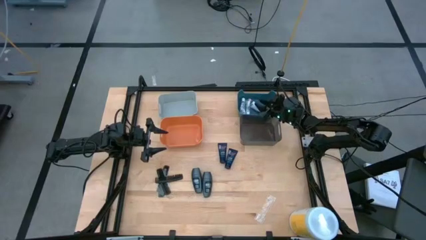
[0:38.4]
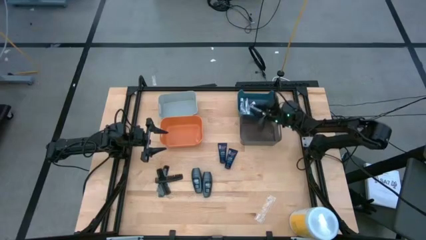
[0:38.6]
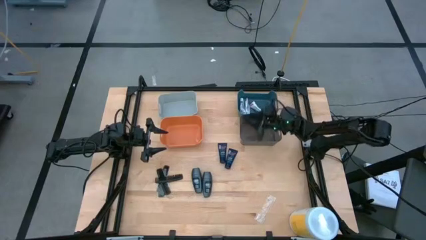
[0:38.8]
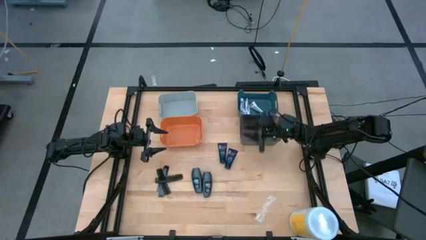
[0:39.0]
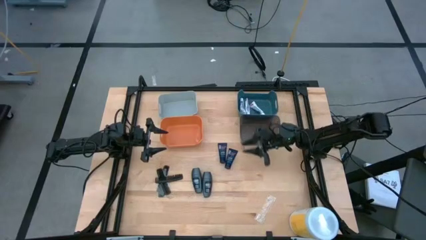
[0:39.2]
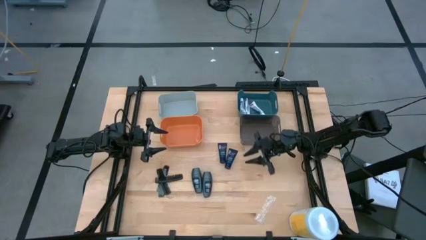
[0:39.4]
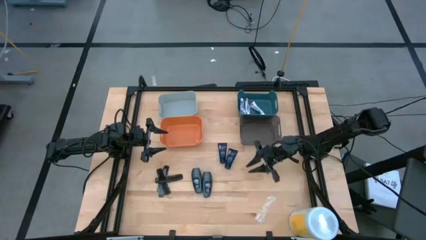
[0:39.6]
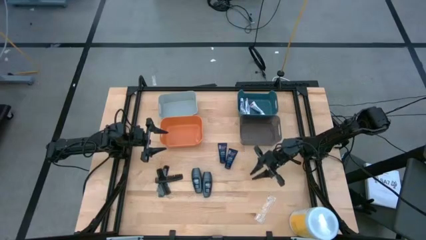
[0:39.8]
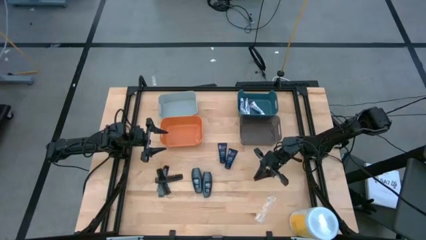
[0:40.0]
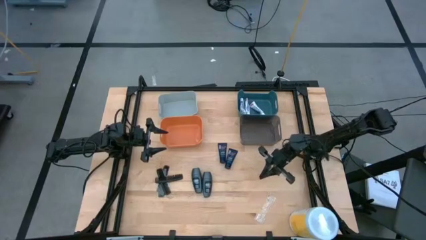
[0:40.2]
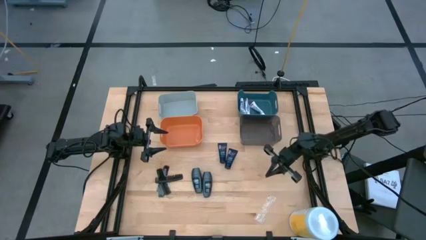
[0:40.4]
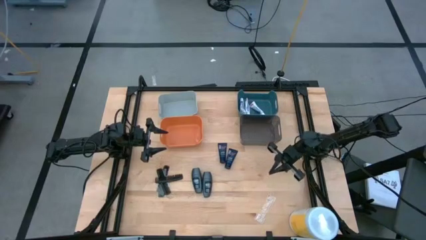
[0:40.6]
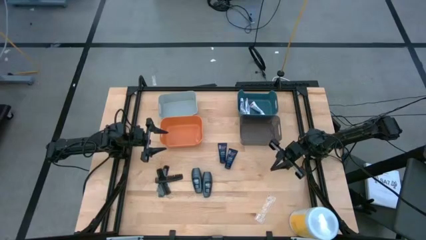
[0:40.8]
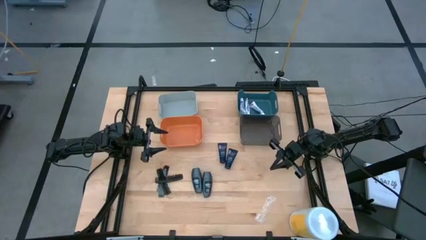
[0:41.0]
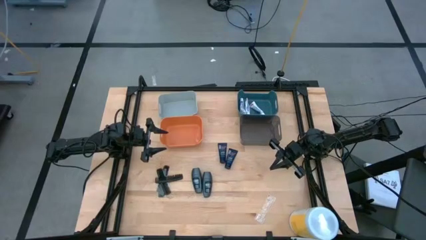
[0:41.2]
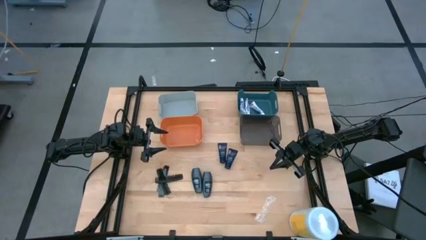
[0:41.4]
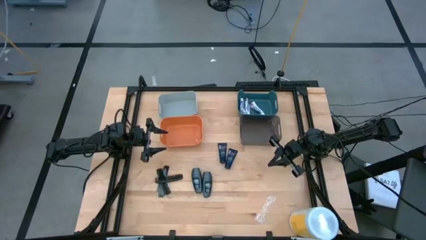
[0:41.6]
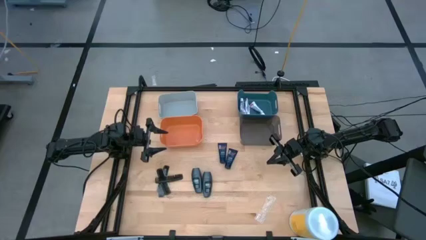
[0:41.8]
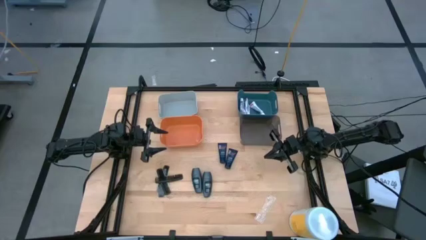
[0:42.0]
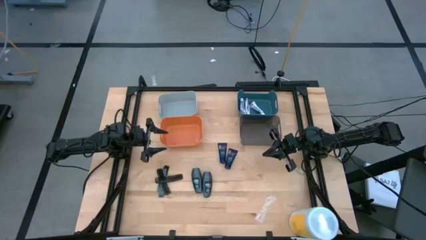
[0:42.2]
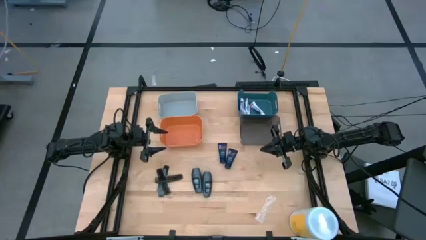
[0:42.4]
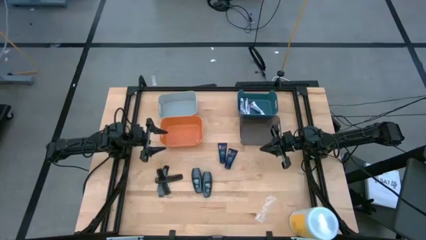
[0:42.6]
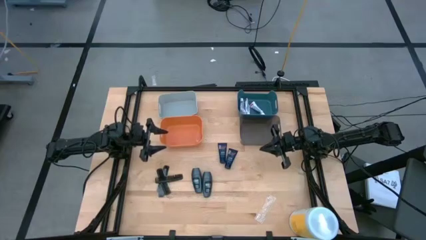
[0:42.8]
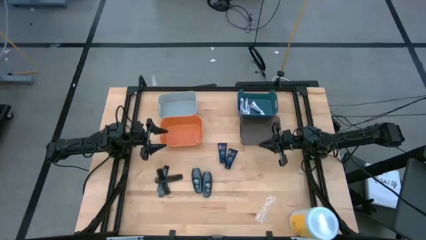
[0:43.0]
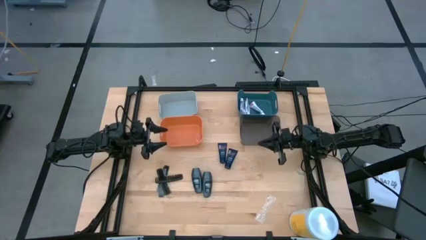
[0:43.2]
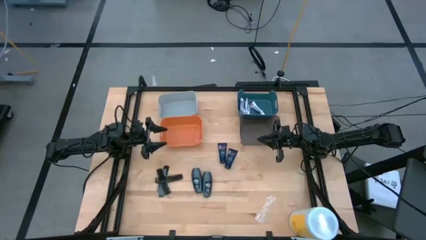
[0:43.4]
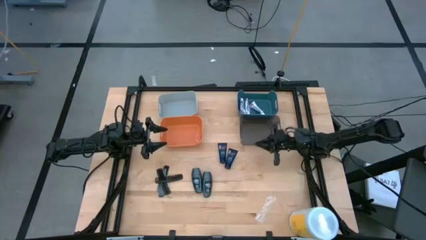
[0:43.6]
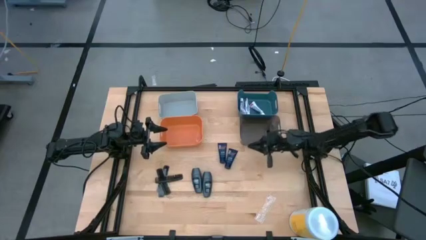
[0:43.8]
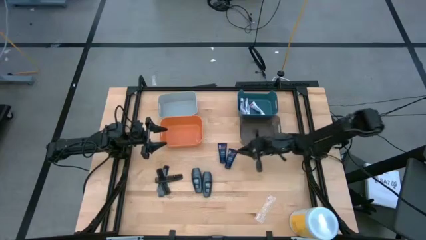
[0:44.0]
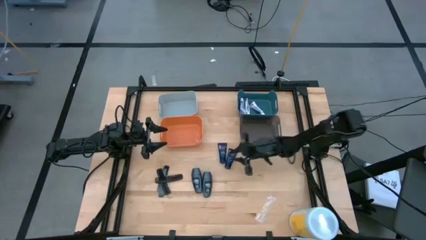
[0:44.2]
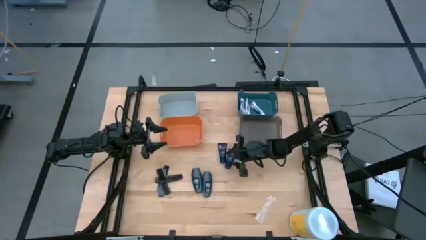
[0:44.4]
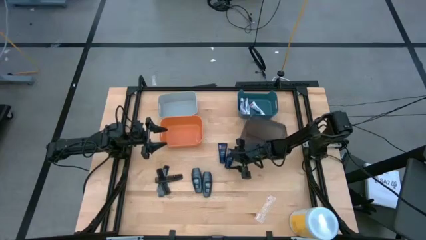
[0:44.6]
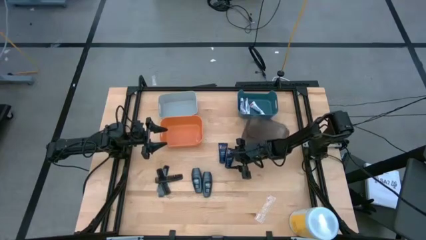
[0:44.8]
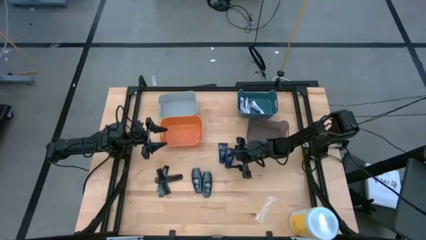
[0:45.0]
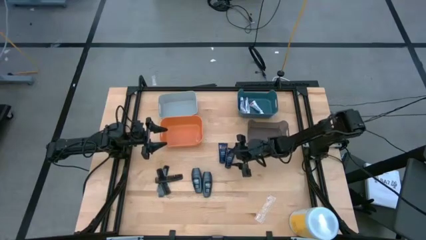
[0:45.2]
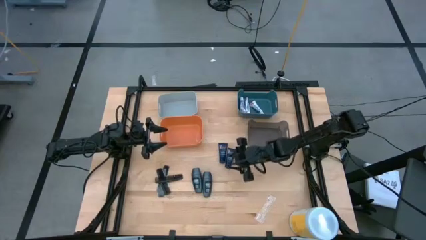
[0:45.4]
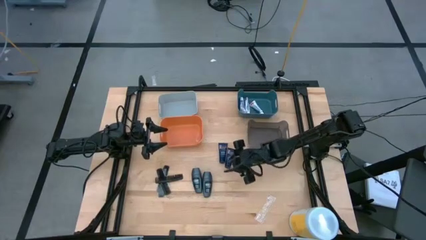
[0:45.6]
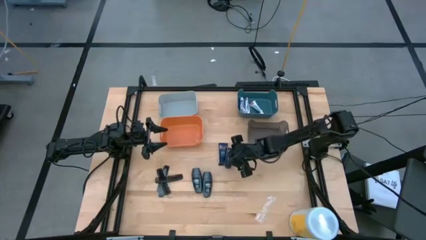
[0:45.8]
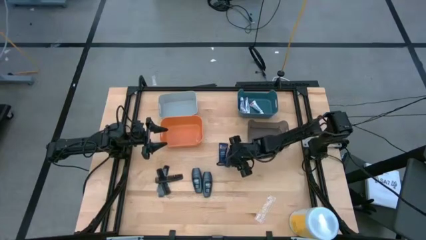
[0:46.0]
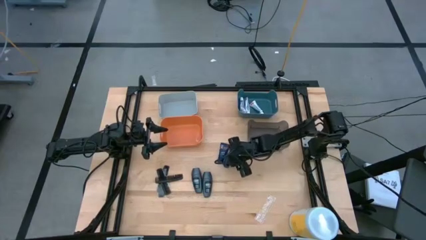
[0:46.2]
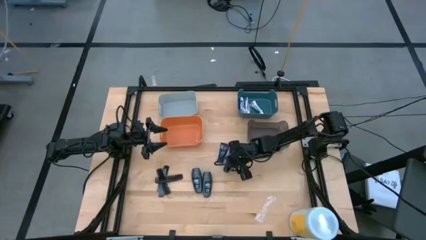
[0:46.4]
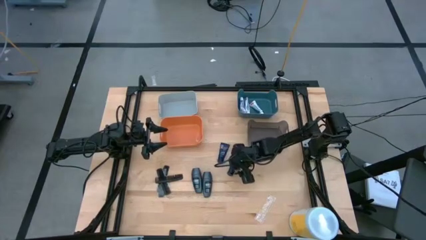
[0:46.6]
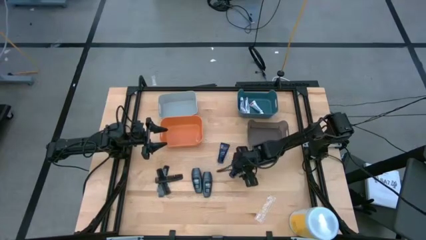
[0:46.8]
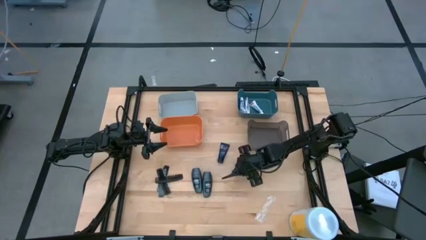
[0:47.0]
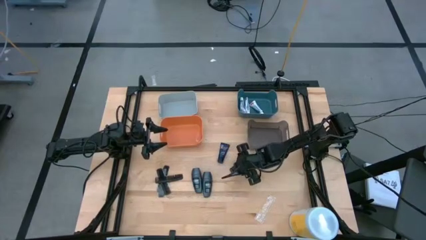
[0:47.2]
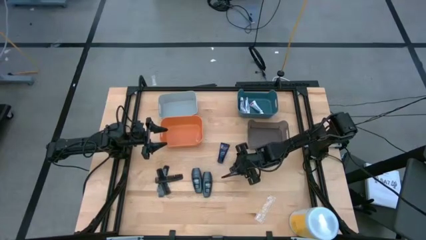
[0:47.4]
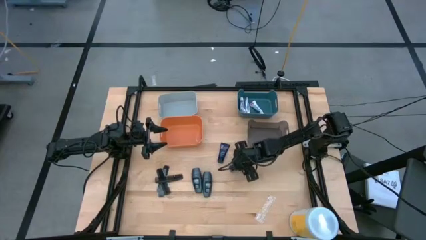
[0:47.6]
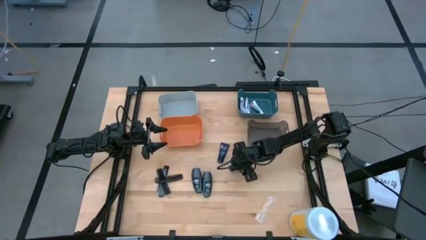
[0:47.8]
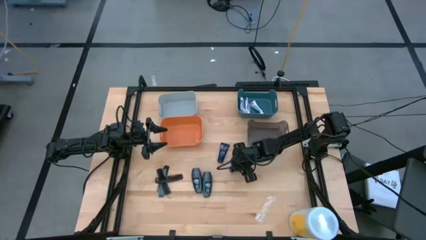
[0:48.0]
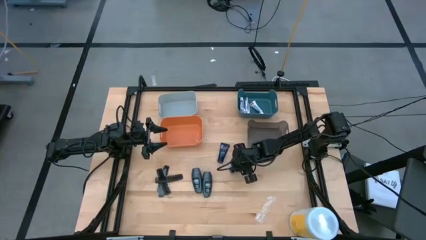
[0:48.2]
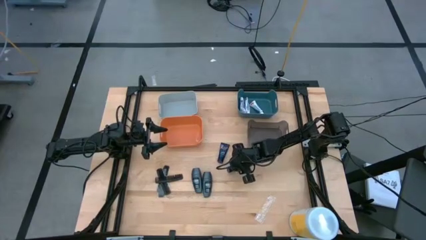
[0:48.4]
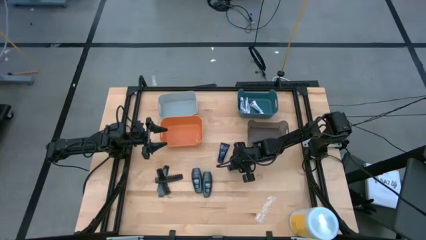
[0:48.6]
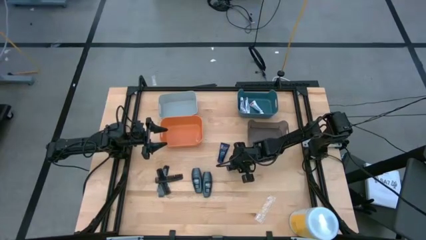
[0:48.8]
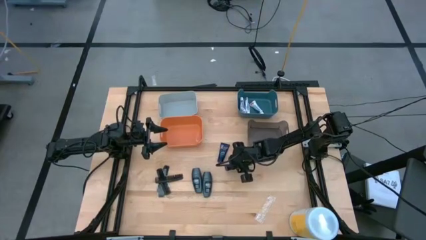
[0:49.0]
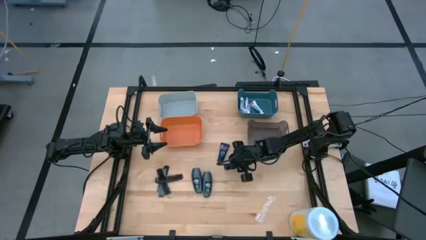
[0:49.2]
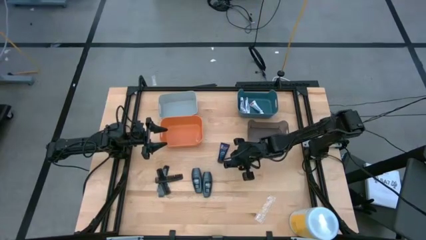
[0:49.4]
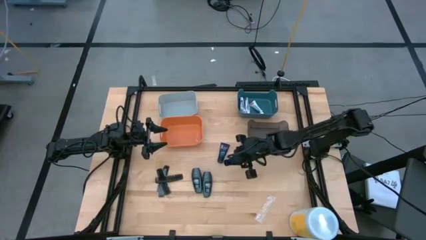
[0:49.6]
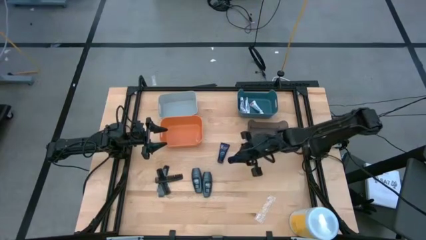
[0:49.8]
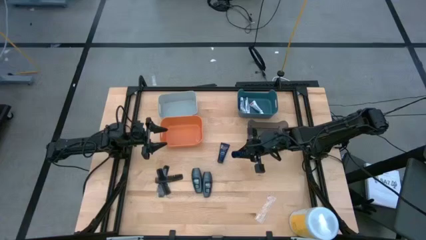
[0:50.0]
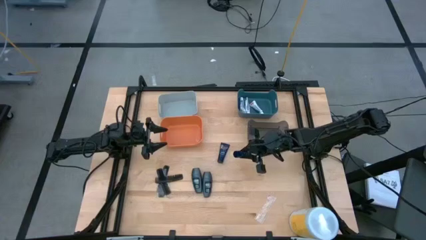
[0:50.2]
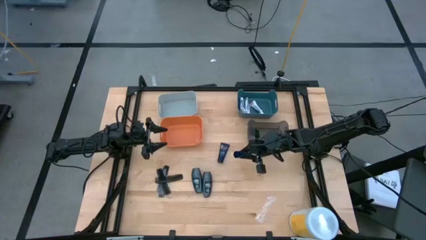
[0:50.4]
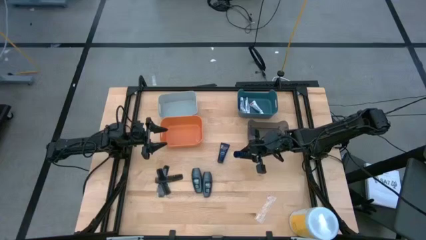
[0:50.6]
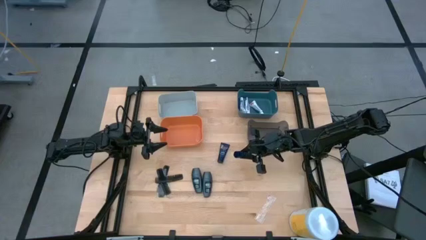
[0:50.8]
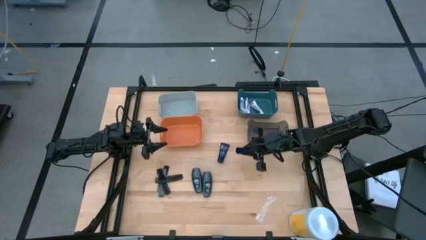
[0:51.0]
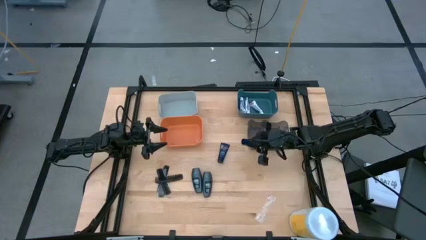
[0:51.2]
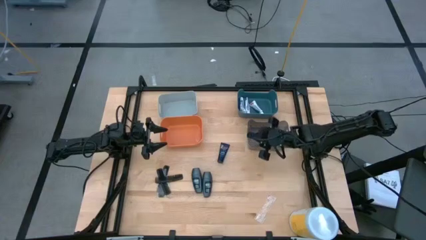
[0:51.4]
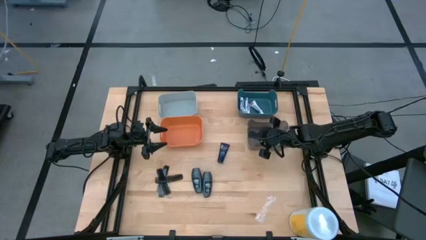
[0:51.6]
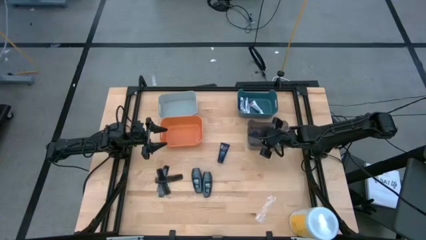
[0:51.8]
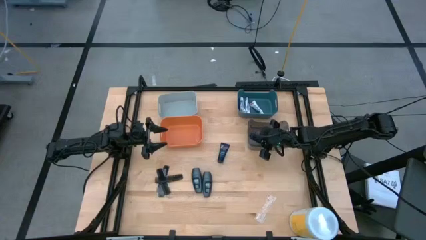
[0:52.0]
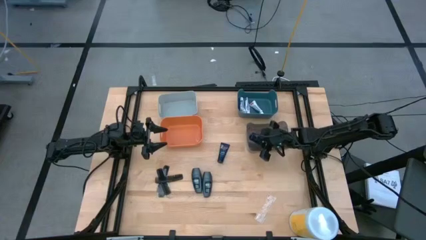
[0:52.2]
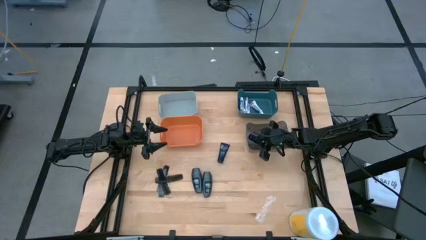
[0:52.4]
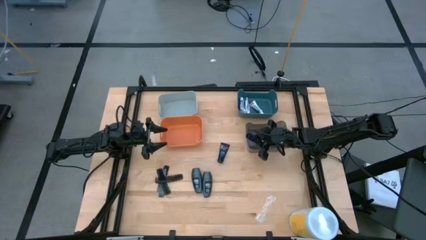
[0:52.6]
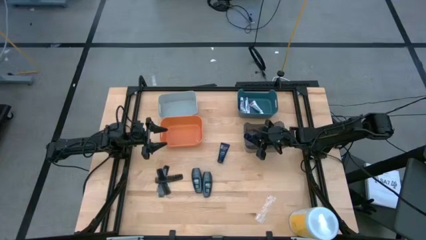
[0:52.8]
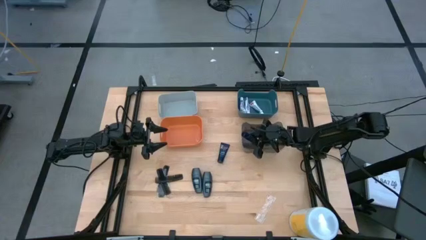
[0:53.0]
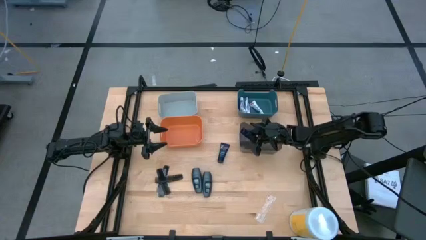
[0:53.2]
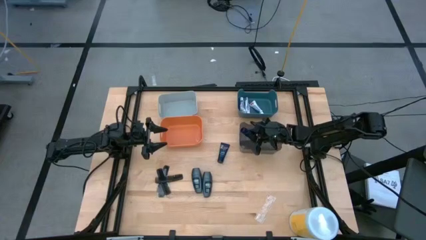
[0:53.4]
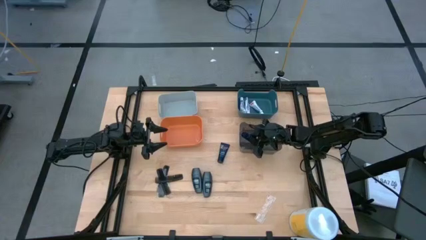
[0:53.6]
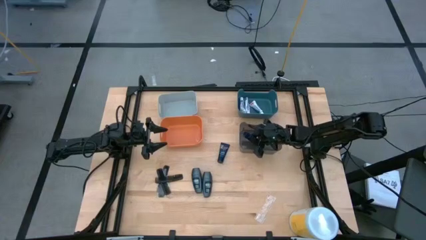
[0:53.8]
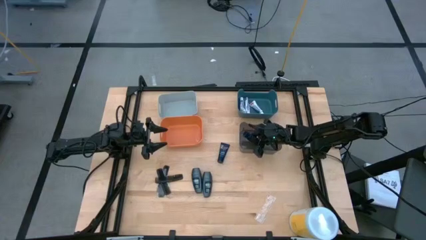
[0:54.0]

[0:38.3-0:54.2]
Task: Pick & Place Travel size toiletries
Put the blue shaving cream into the black bin
